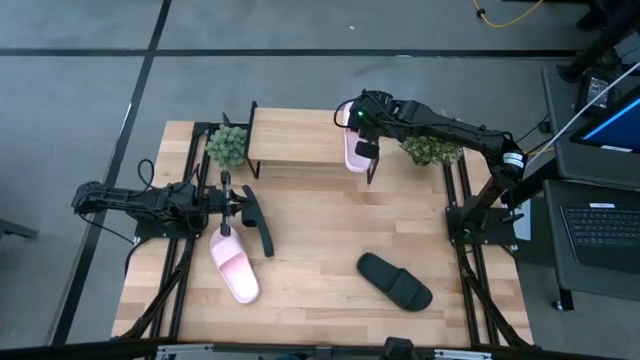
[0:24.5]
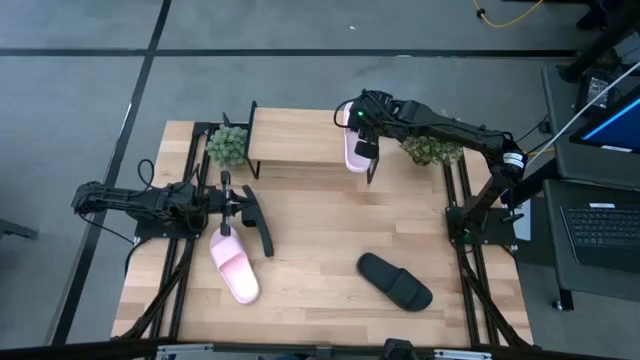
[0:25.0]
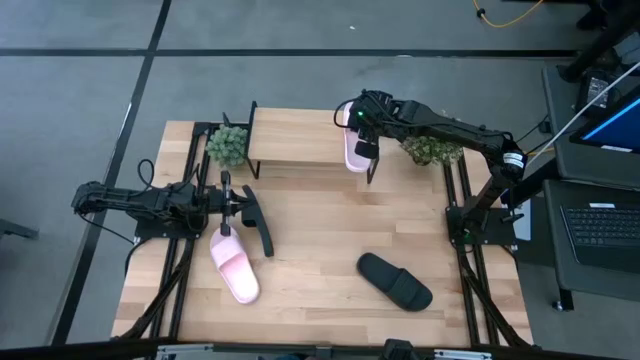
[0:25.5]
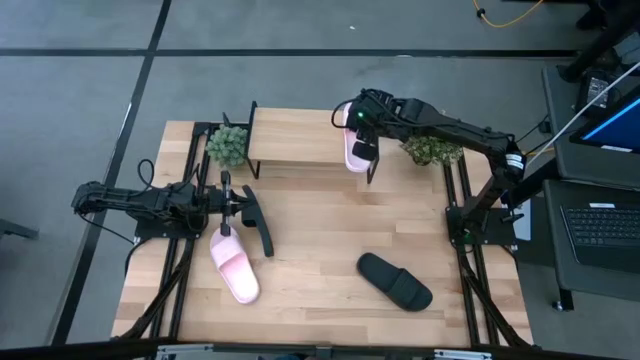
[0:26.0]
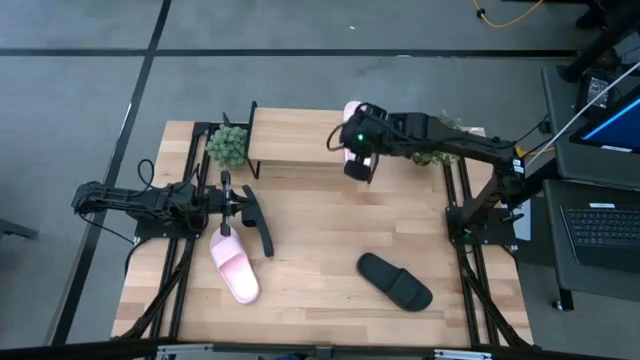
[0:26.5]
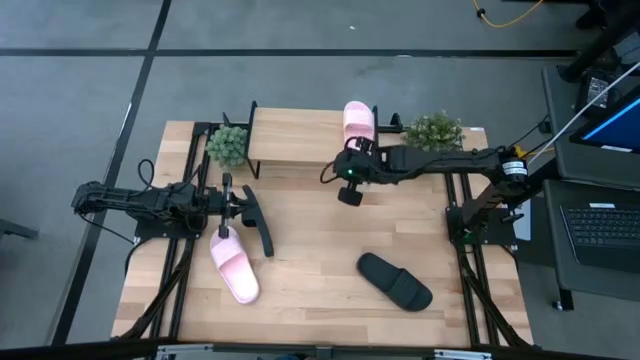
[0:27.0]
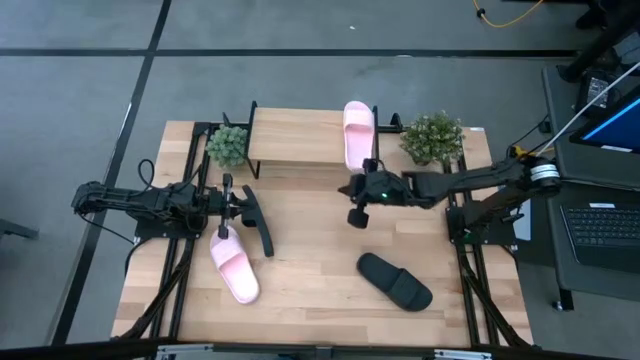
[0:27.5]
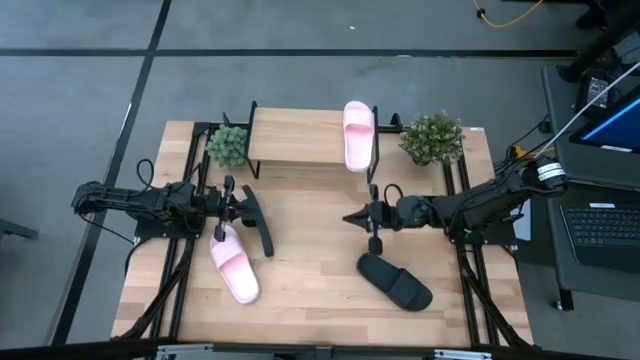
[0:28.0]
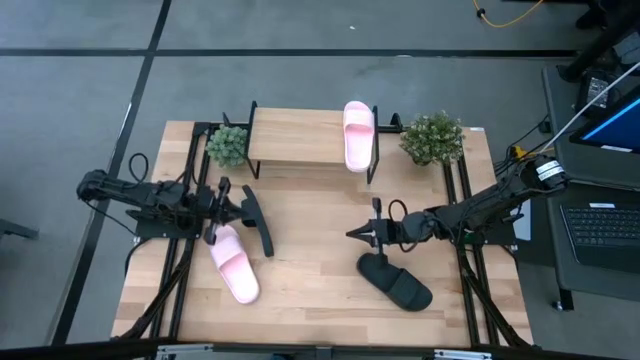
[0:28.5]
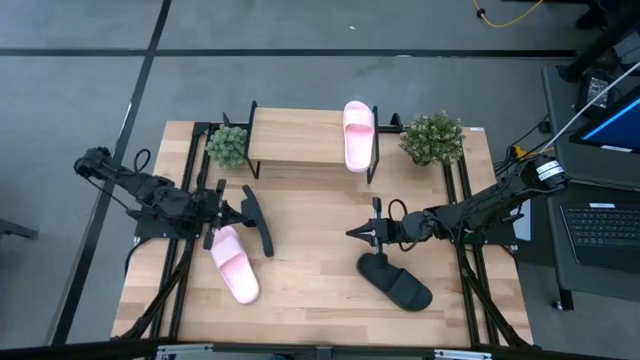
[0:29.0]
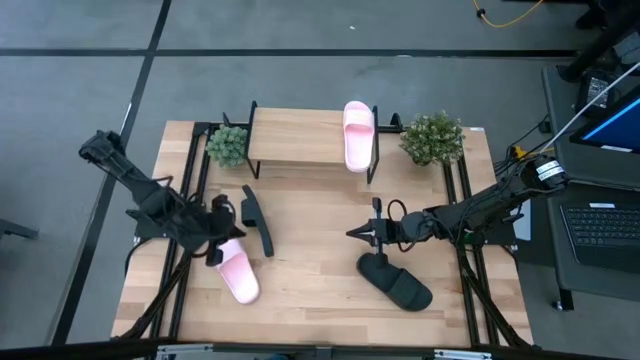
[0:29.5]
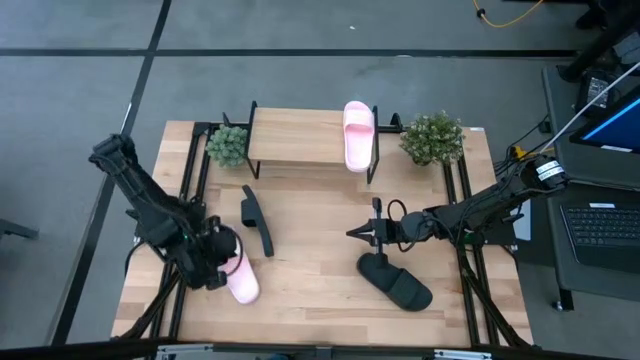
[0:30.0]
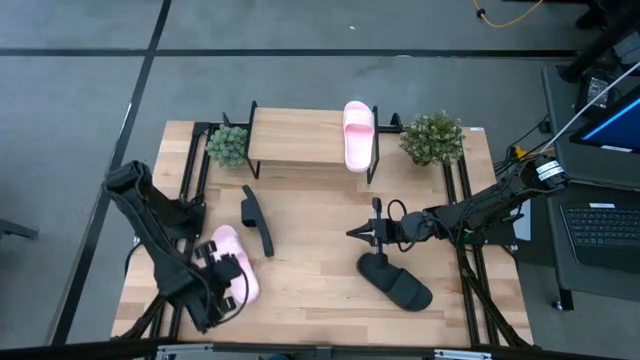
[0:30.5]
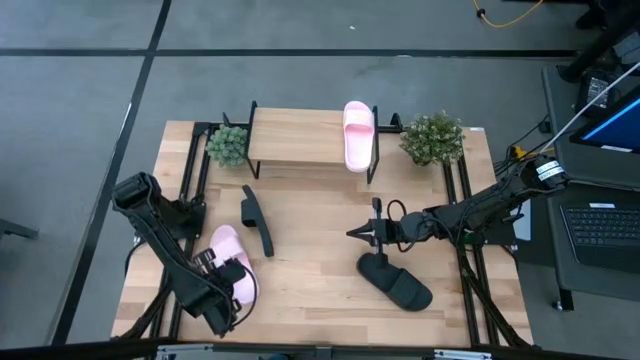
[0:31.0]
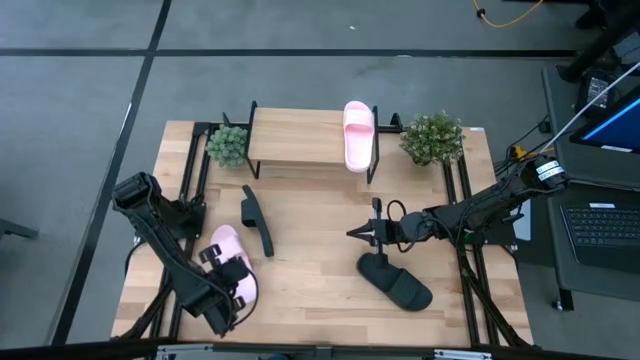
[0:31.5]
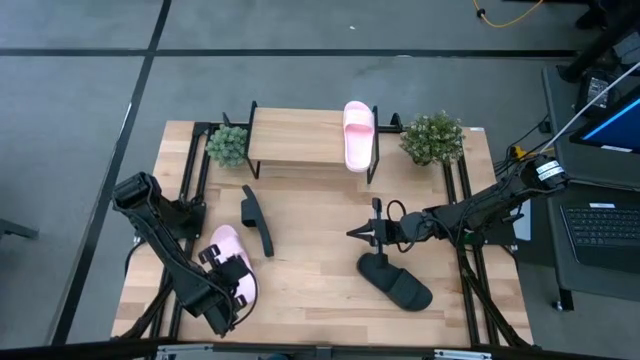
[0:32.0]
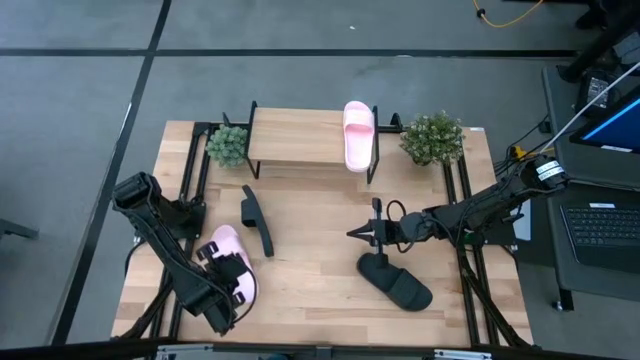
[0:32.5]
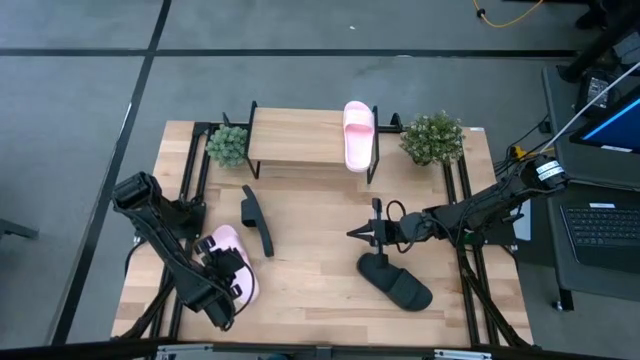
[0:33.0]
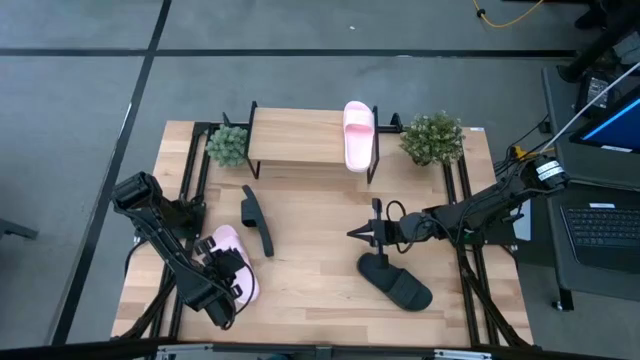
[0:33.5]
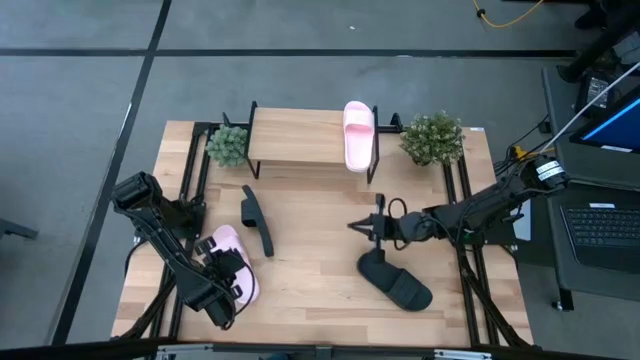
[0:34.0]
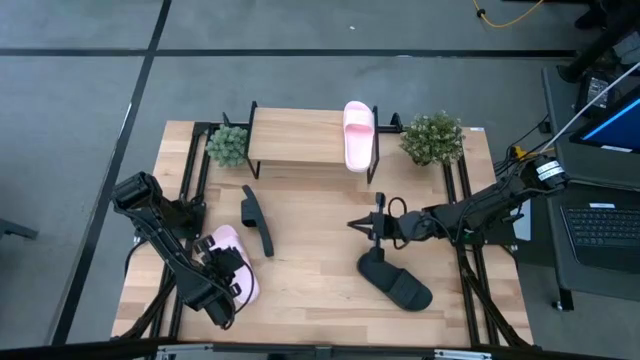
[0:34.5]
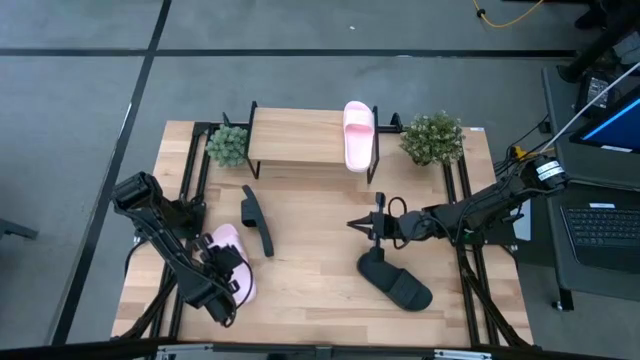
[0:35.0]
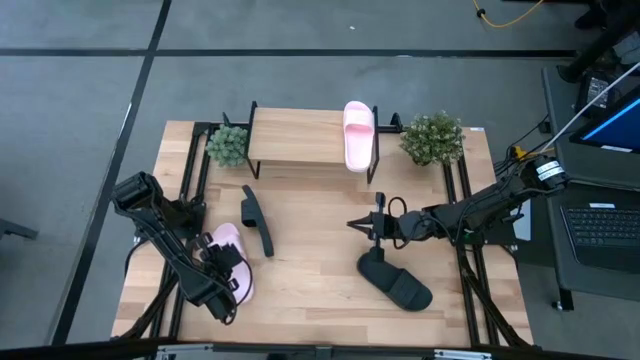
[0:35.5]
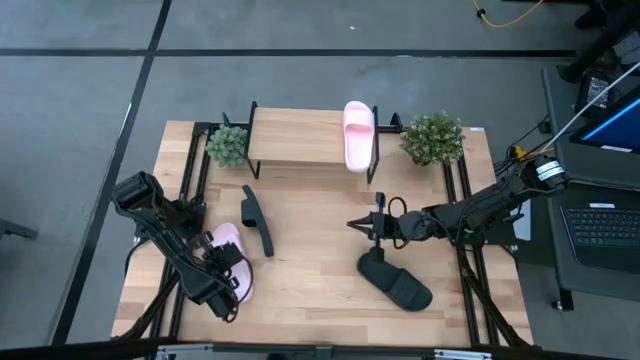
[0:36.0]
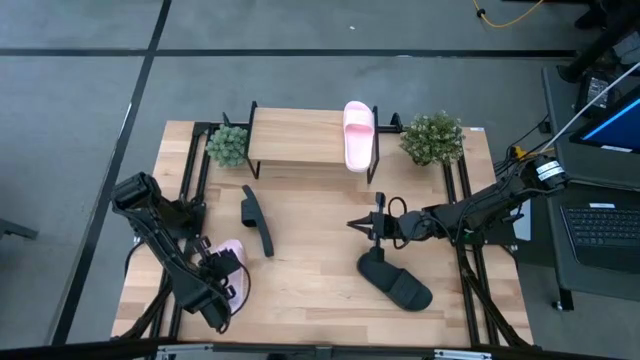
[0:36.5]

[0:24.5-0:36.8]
Task: Pick and place slides into the shelf
Put the pink slipper on the shelf

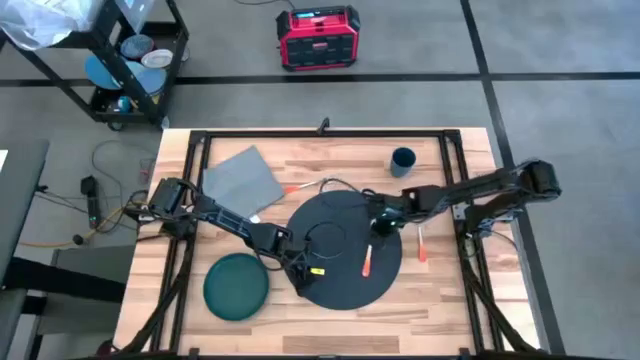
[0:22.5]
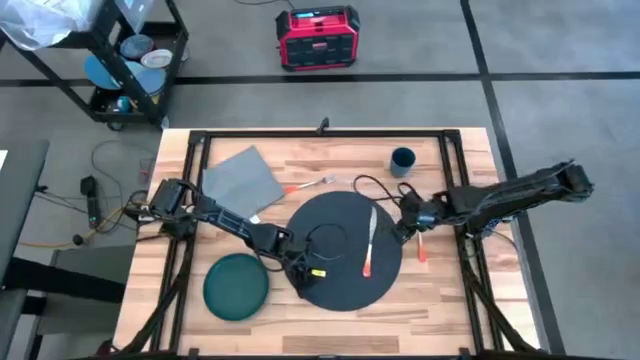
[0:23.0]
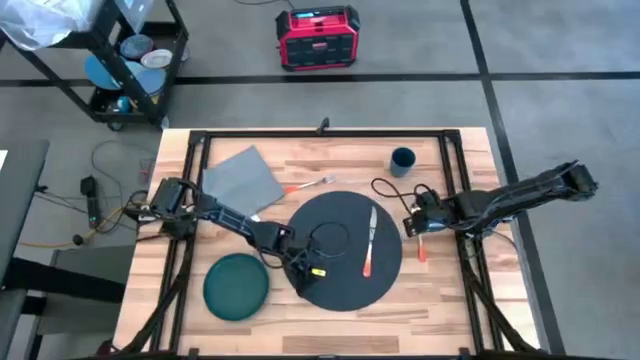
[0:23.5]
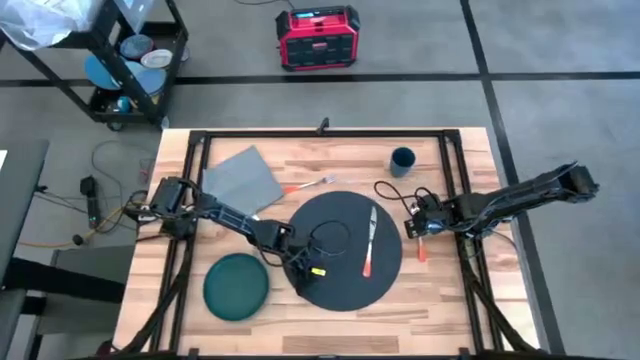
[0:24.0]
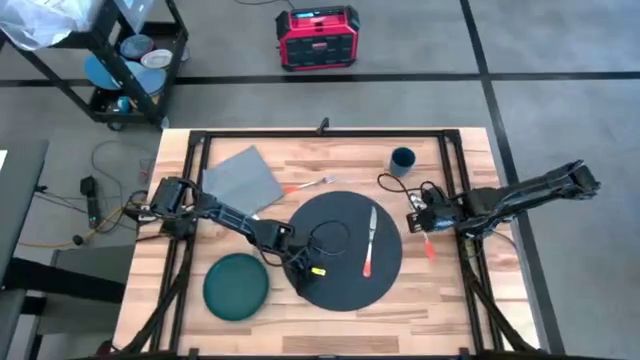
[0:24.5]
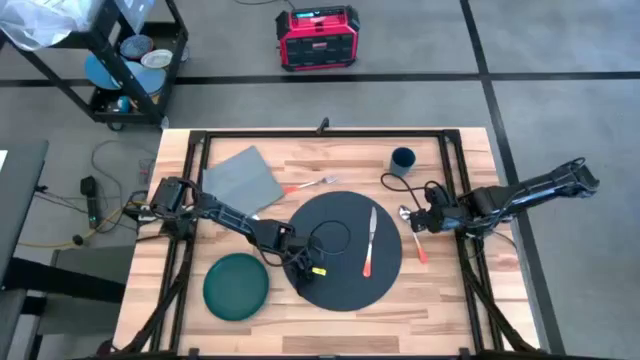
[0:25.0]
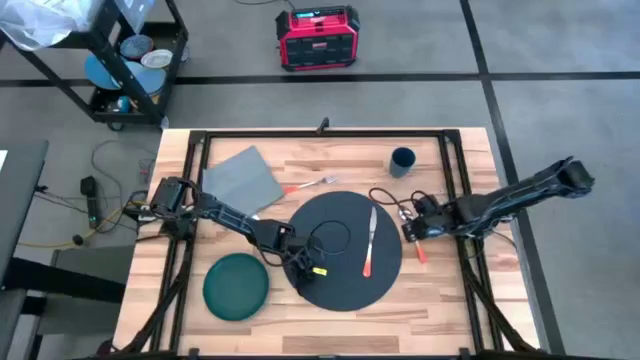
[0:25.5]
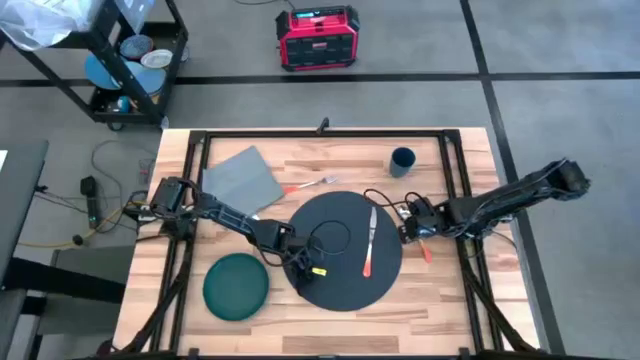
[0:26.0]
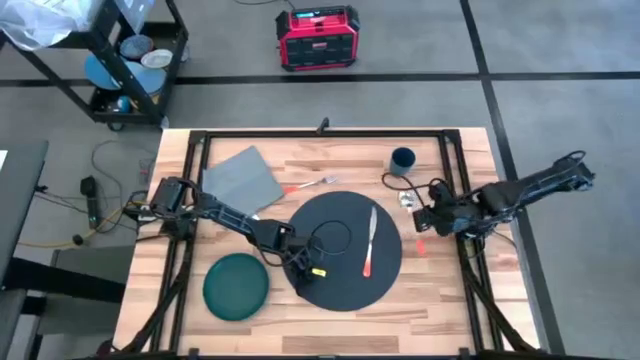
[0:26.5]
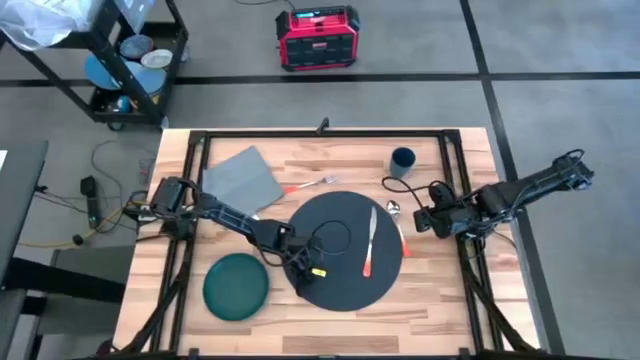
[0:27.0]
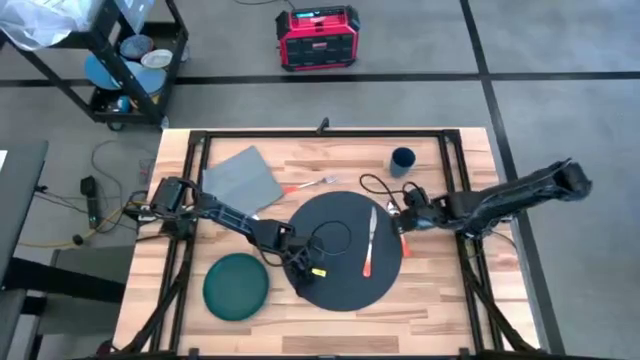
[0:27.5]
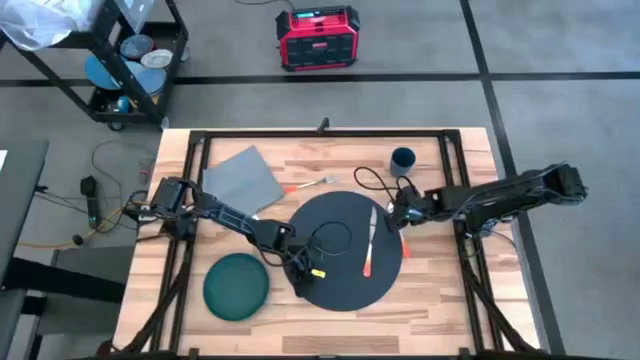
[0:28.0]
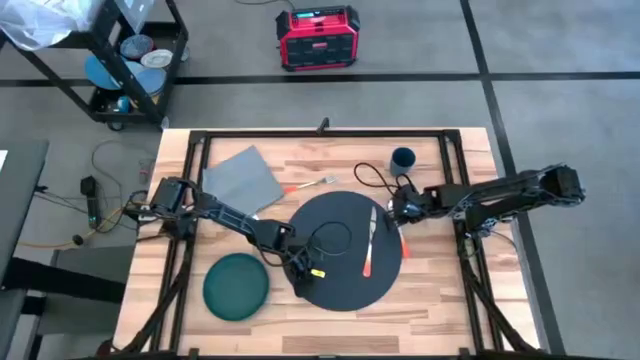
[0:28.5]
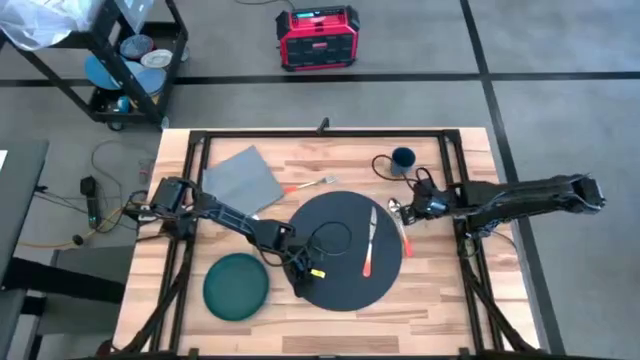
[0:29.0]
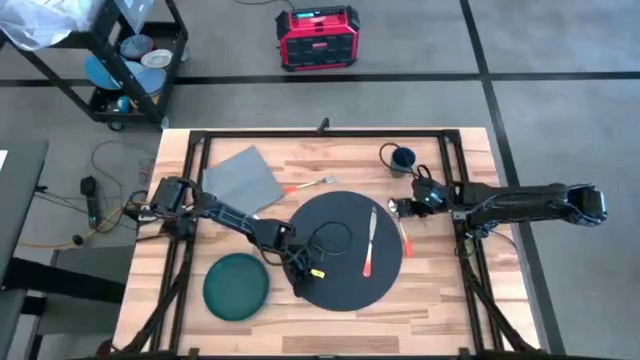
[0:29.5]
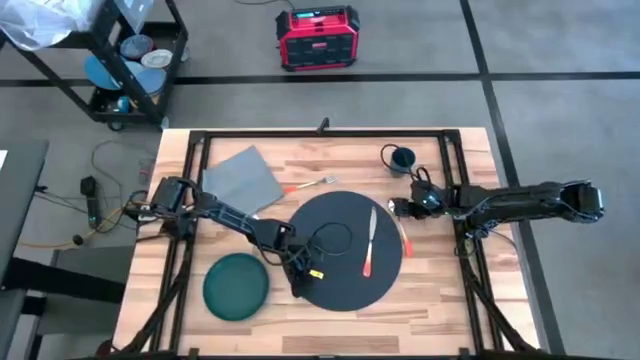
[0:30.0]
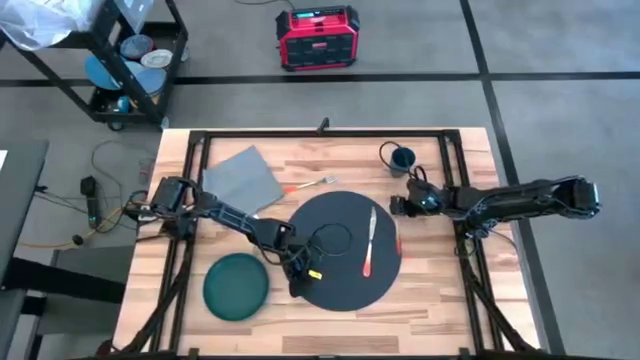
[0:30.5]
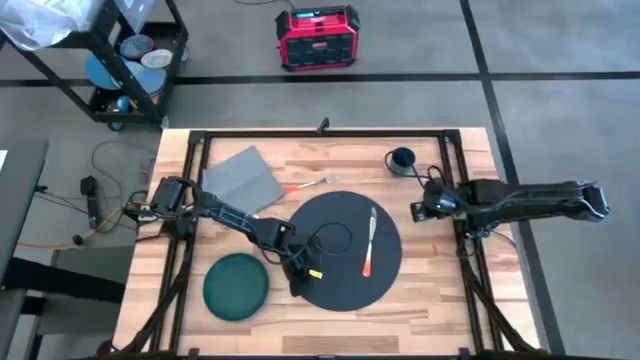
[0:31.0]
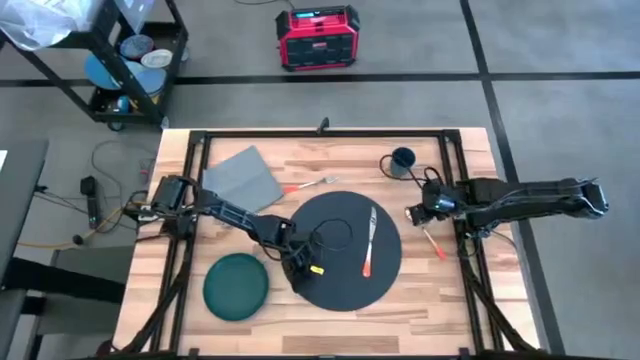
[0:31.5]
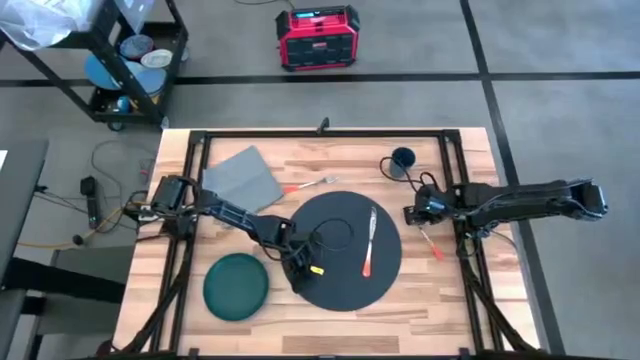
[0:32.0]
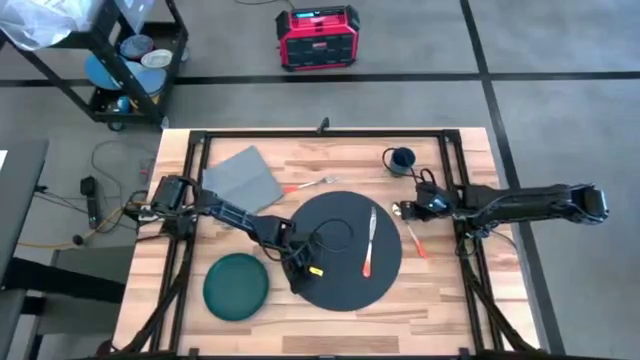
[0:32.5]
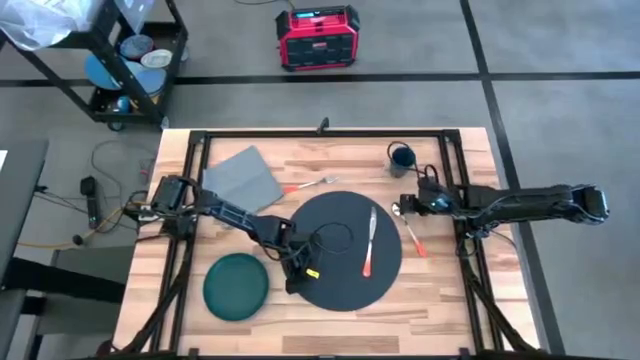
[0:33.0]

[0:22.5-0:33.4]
Task: Set table place
Put the orange spoon on the blue tablemat
